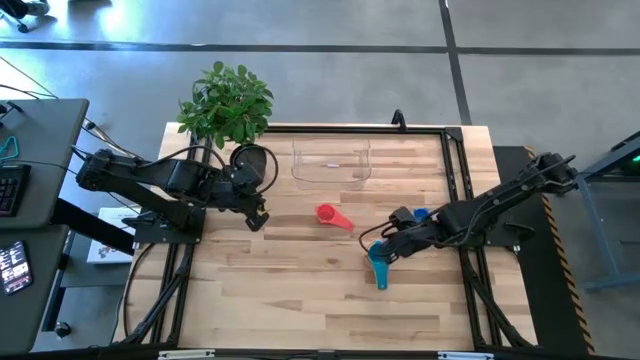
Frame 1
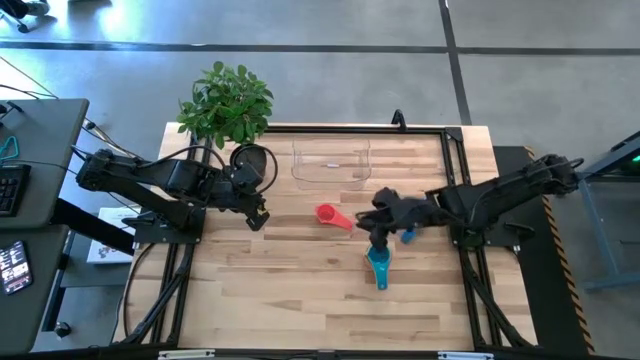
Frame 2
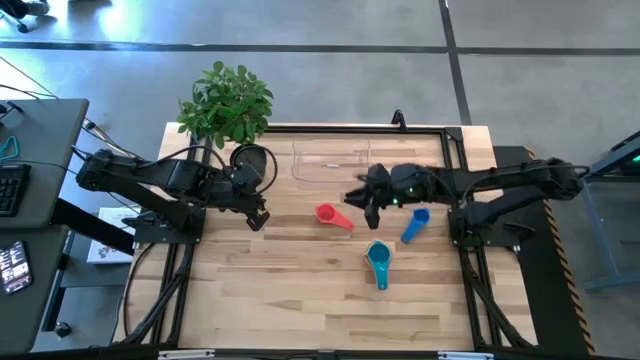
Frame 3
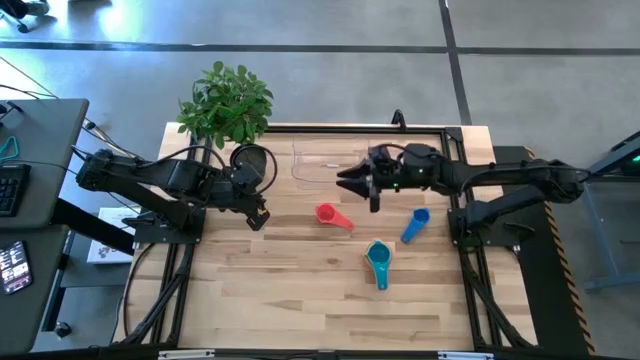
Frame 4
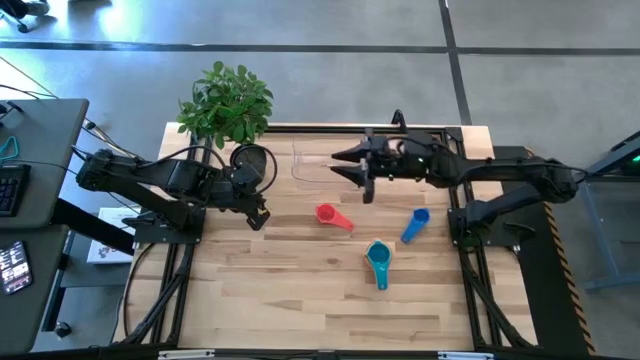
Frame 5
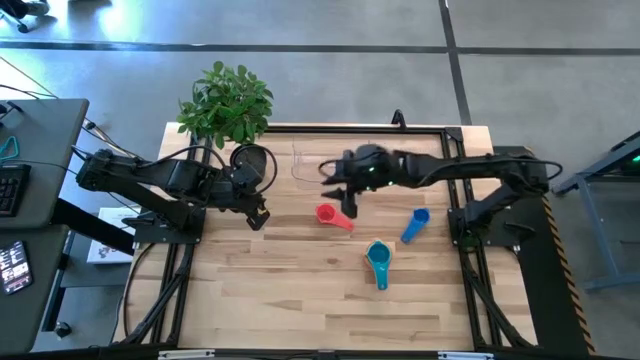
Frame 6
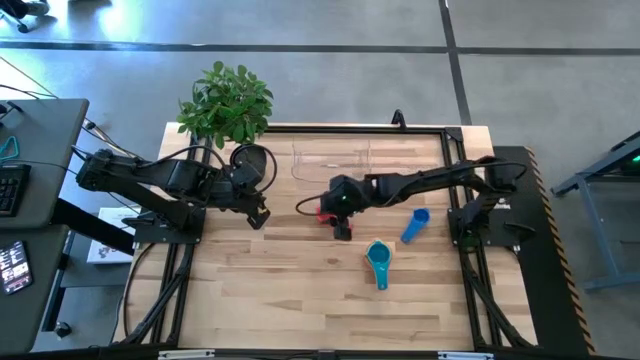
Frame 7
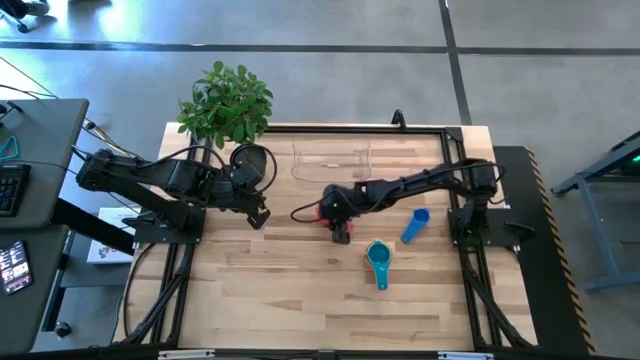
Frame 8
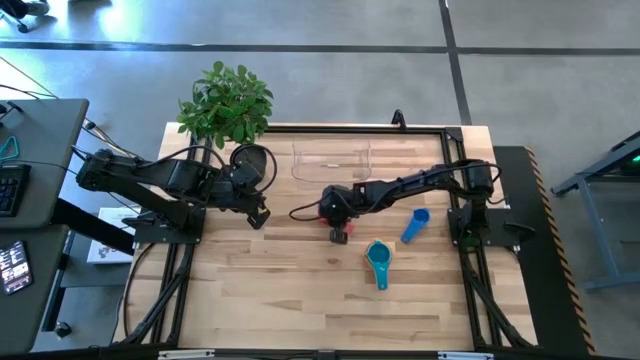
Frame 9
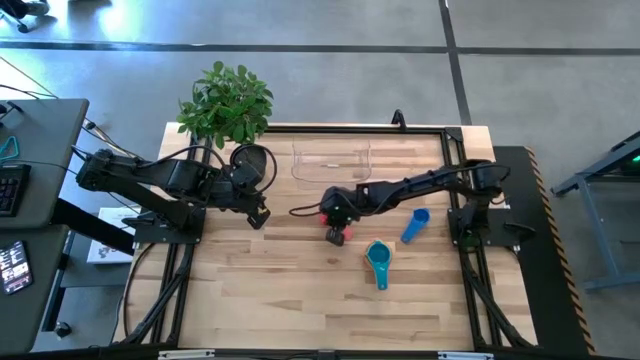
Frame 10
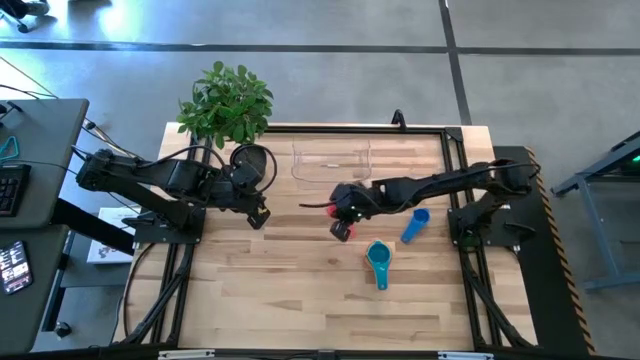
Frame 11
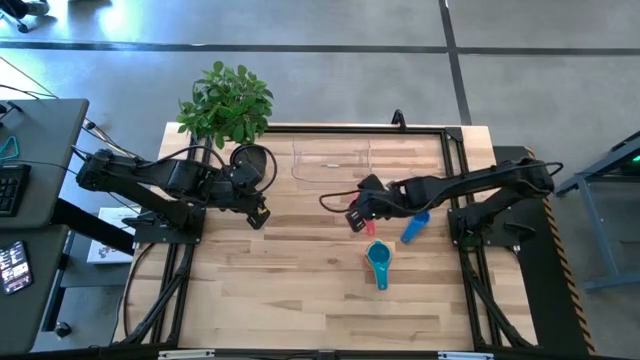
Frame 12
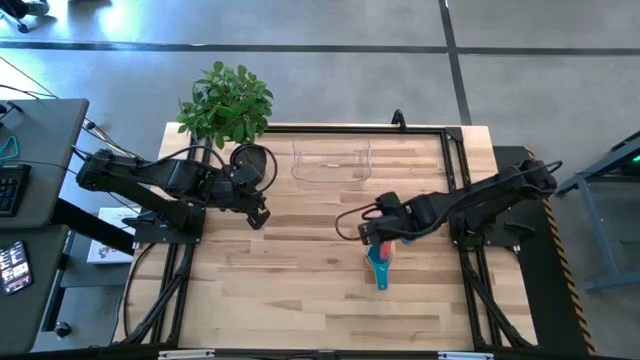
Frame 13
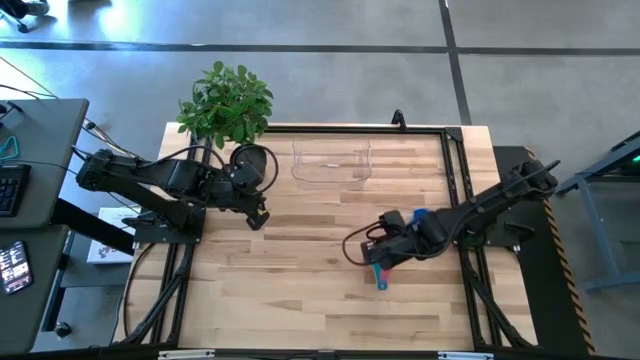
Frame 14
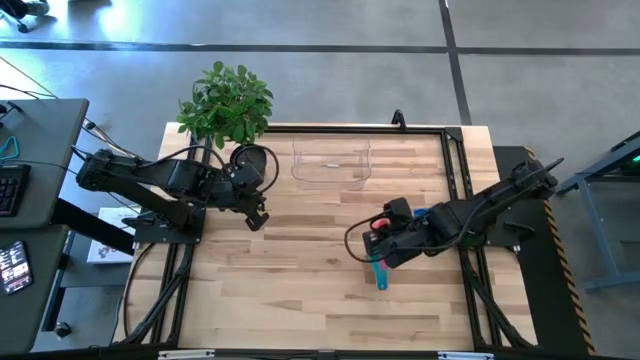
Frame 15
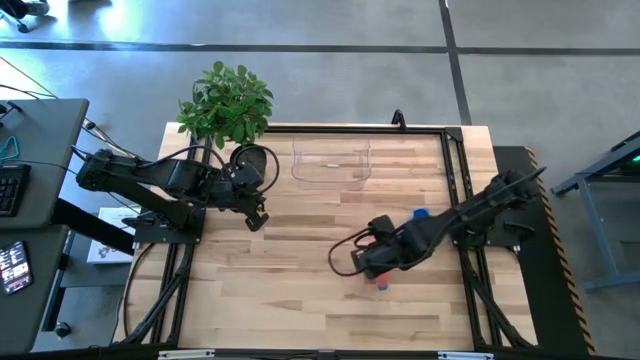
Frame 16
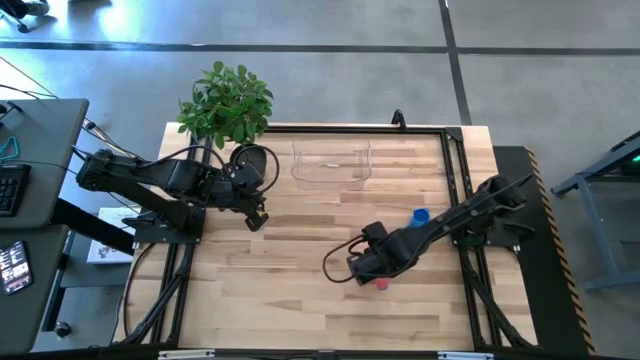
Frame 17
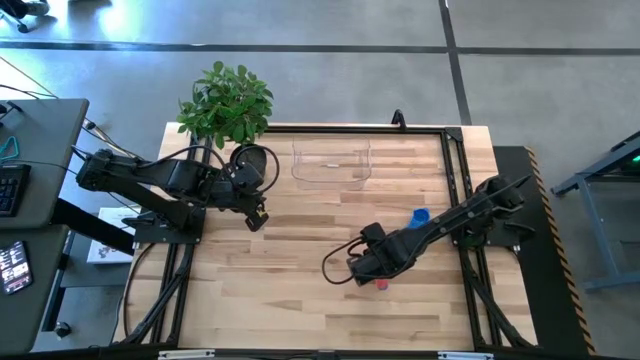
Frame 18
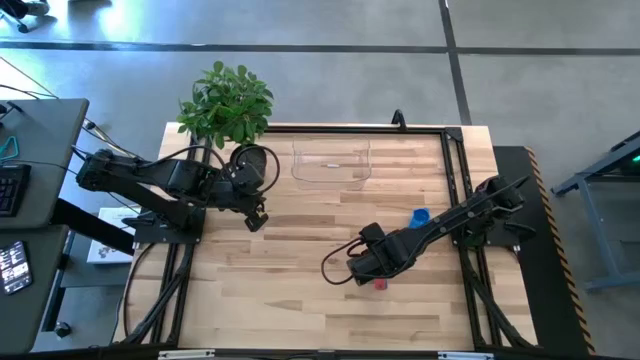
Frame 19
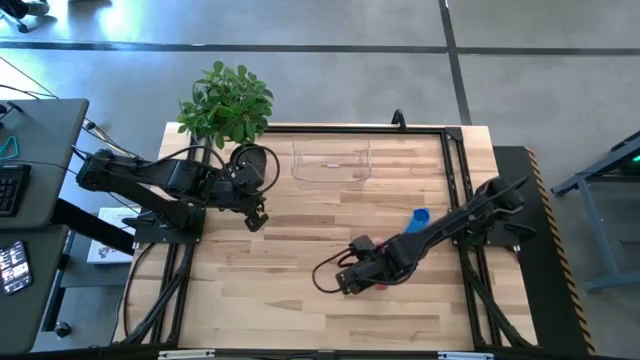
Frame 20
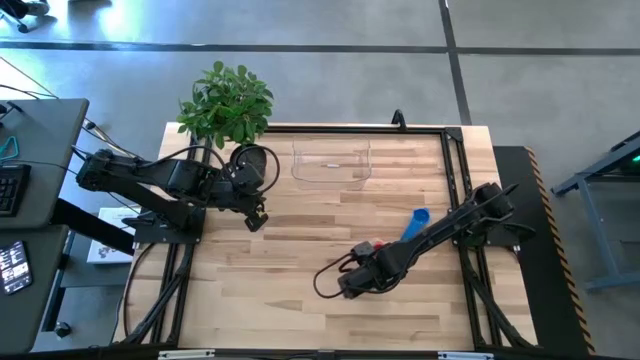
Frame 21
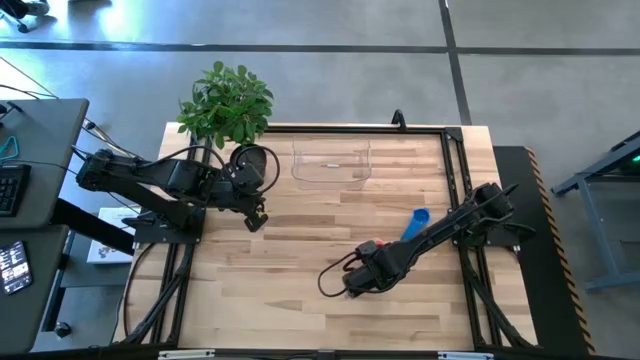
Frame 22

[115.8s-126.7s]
Task: Nest measuring cups in basket
Stack the red measuring cup on top of the light blue measuring cup

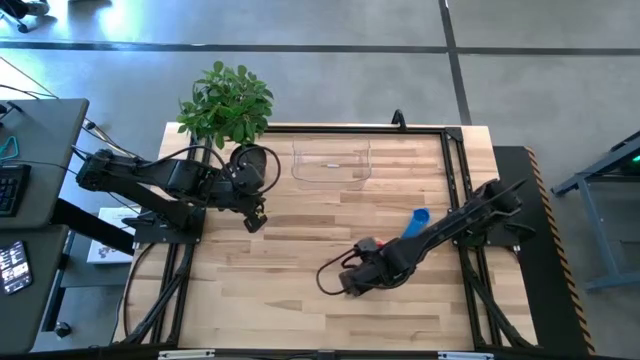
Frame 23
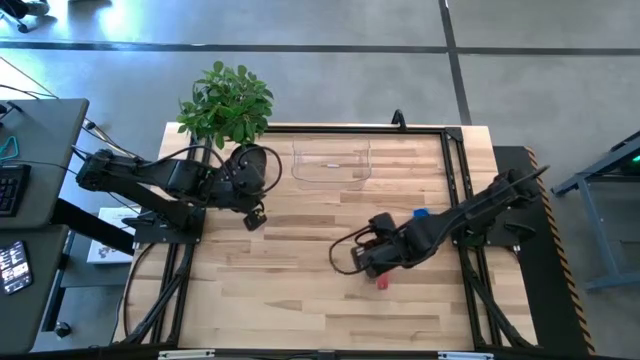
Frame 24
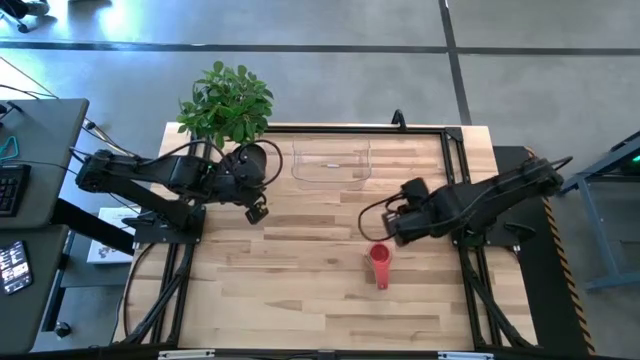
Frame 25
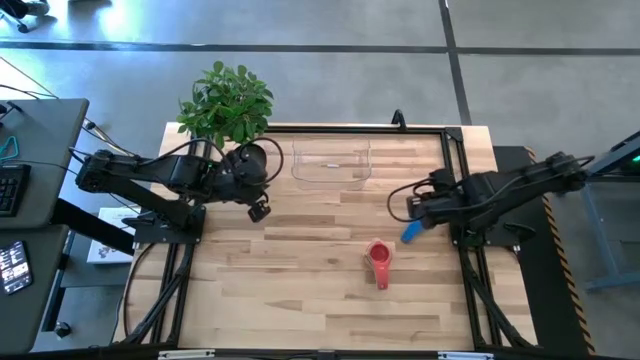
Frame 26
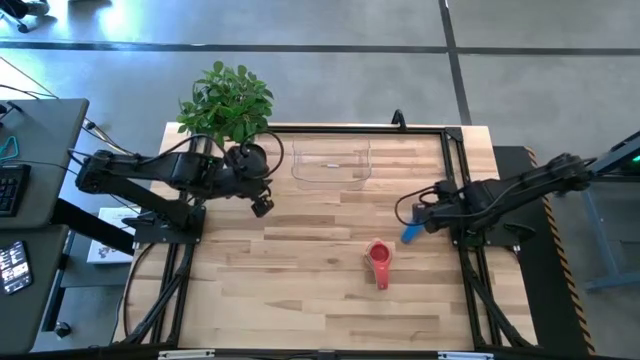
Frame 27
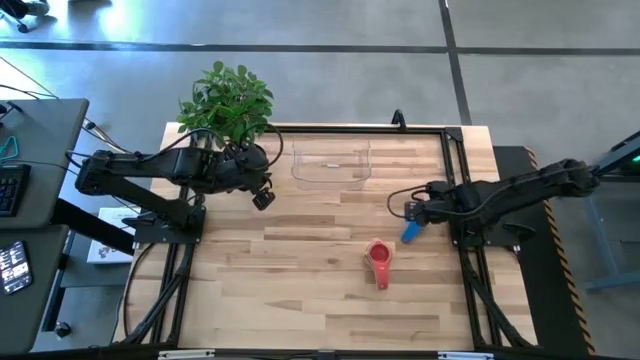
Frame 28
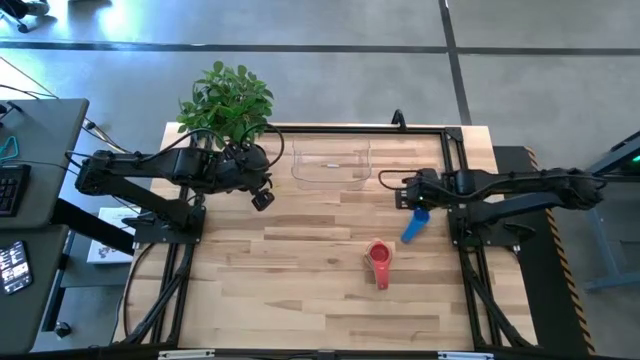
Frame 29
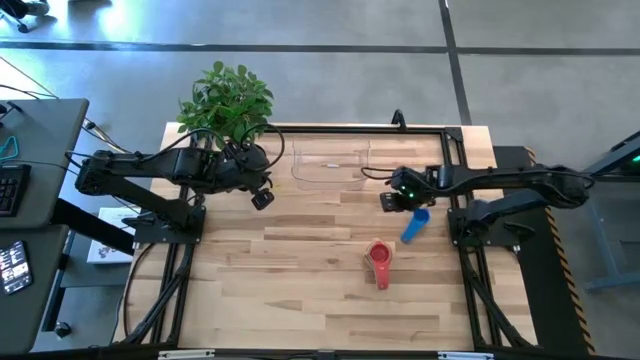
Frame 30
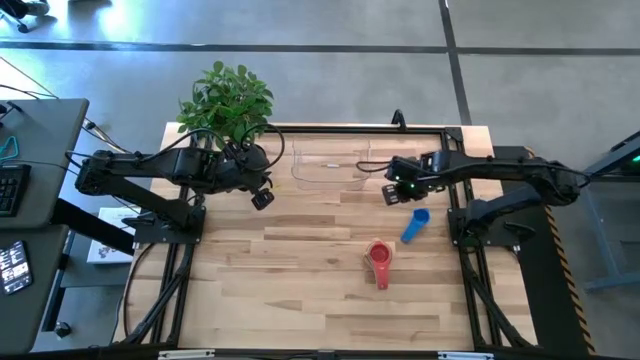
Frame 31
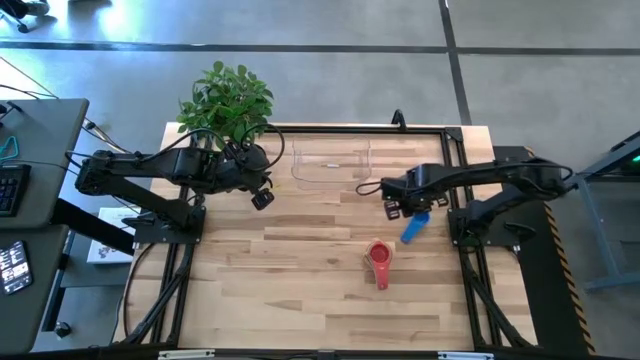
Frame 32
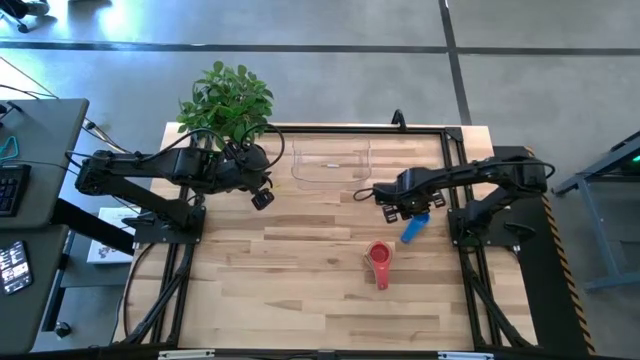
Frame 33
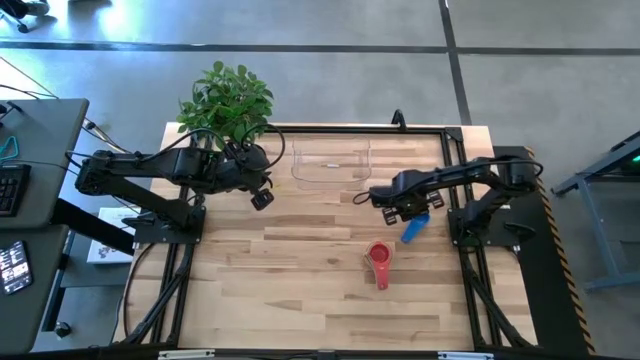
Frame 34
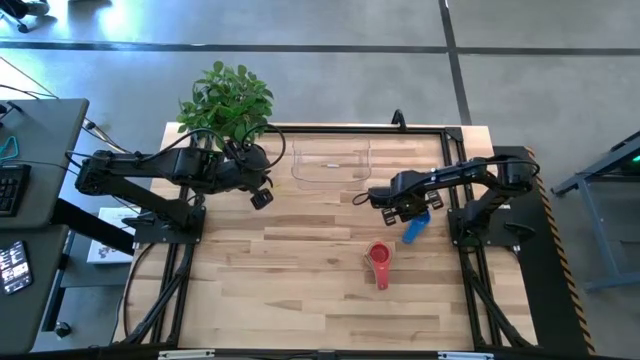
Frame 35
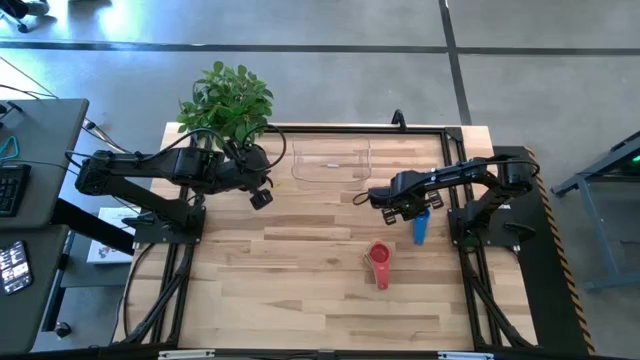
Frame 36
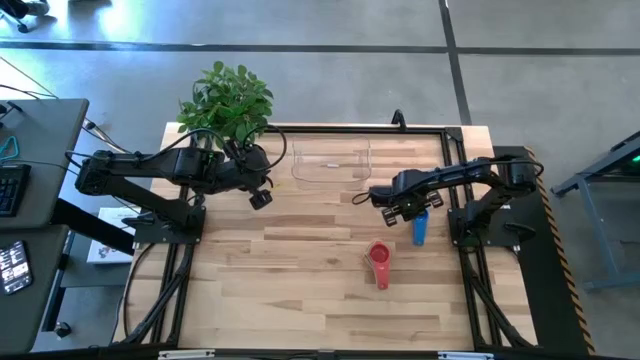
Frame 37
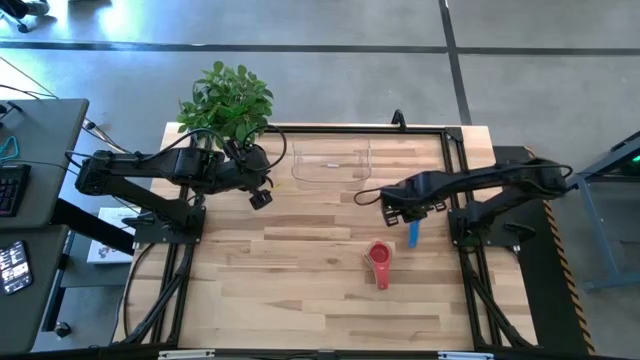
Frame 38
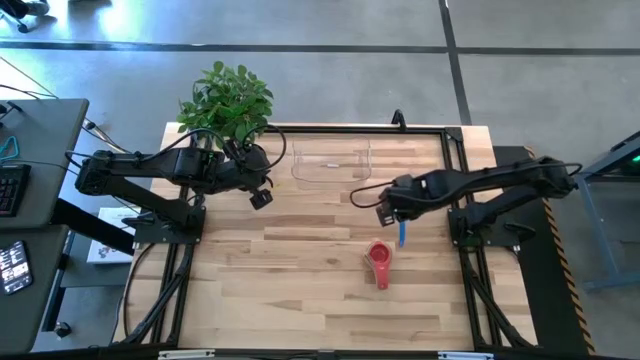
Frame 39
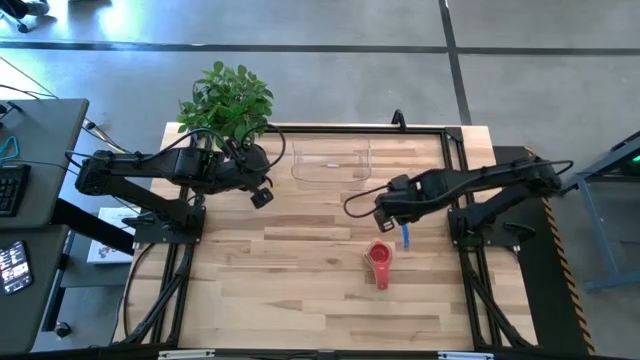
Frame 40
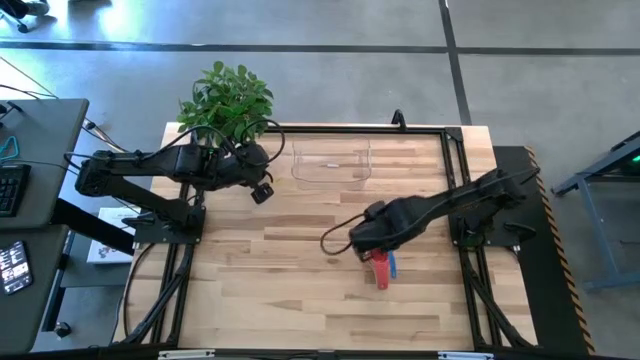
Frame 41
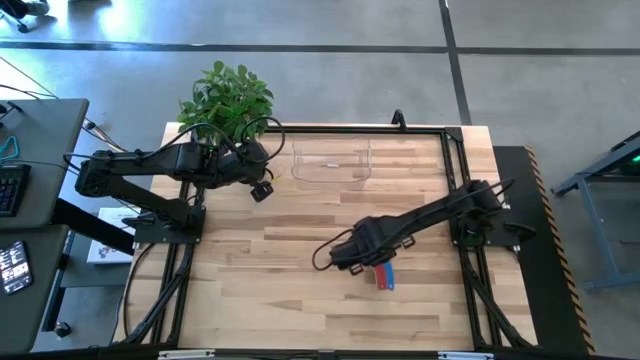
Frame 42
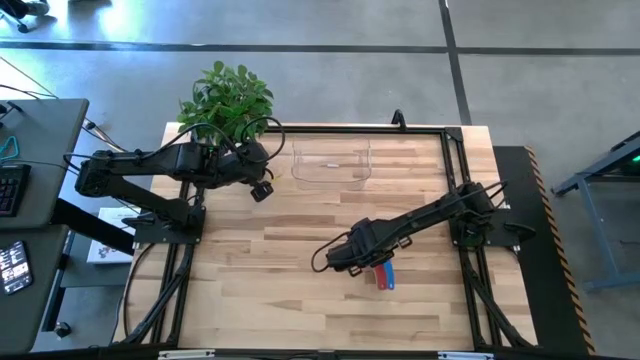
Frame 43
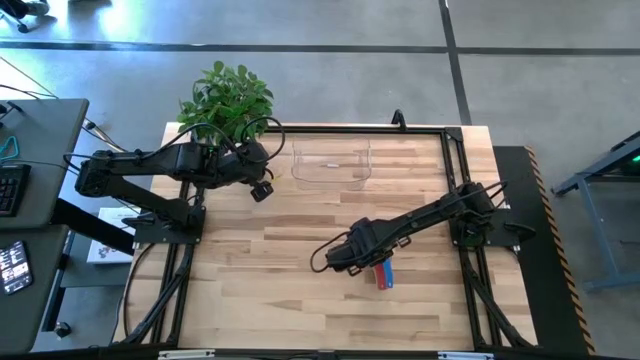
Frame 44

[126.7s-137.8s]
Stack the blue measuring cup on top of the red measuring cup
